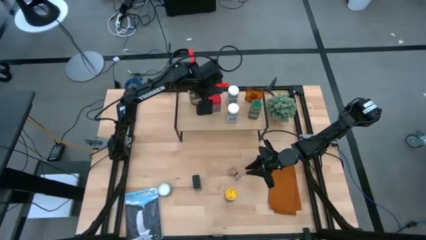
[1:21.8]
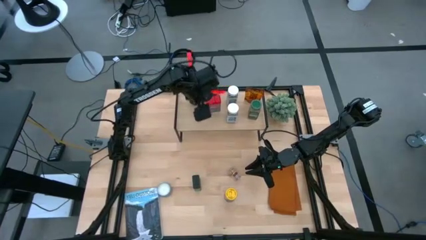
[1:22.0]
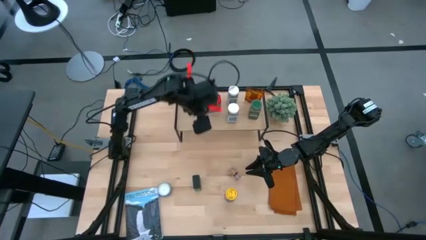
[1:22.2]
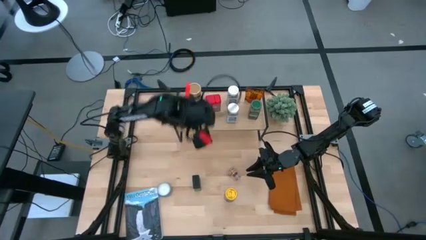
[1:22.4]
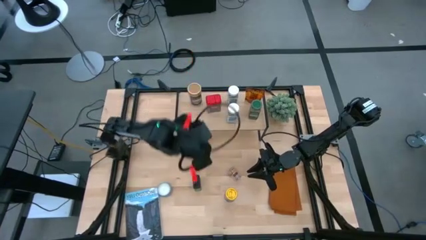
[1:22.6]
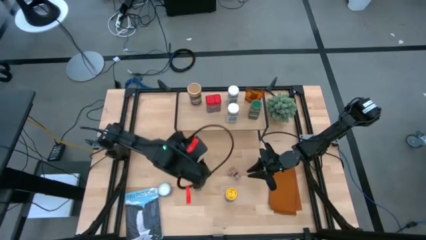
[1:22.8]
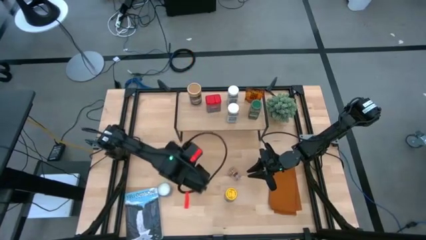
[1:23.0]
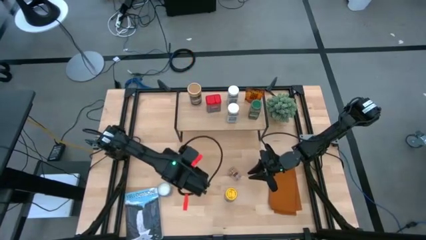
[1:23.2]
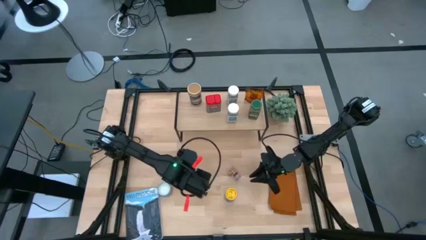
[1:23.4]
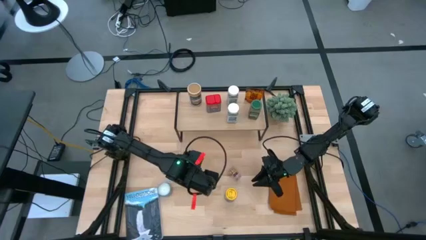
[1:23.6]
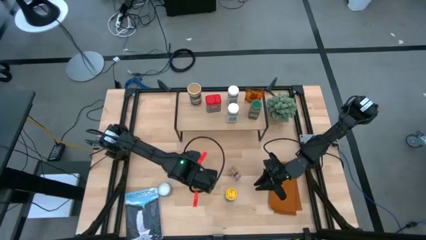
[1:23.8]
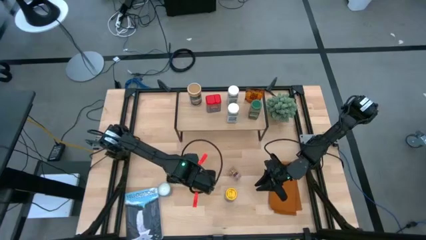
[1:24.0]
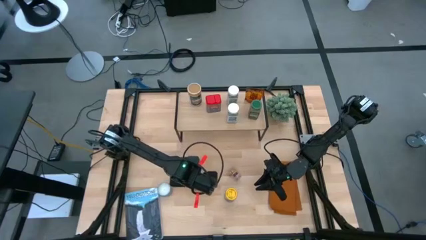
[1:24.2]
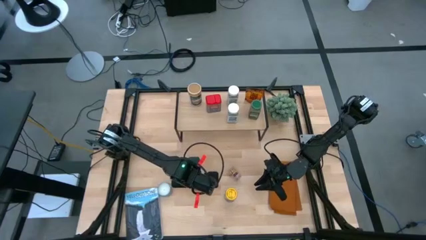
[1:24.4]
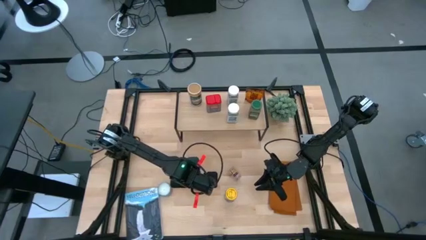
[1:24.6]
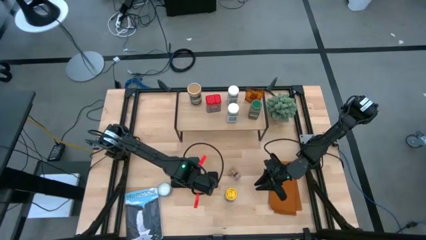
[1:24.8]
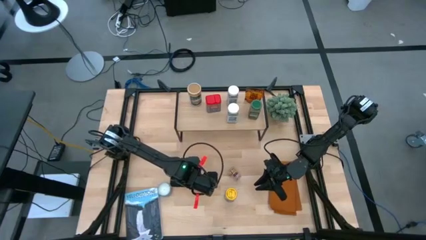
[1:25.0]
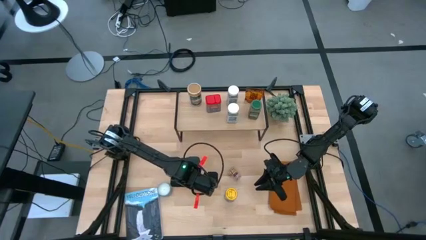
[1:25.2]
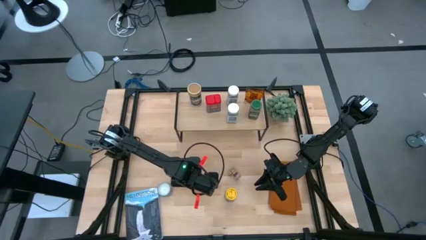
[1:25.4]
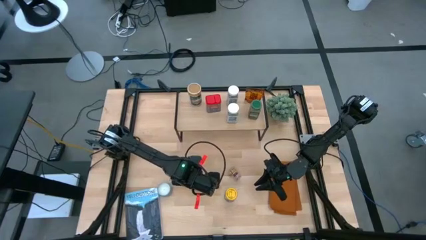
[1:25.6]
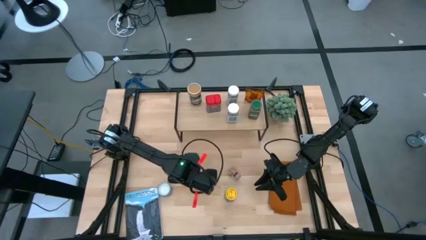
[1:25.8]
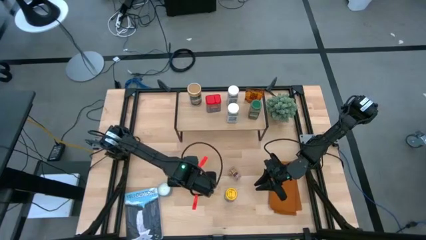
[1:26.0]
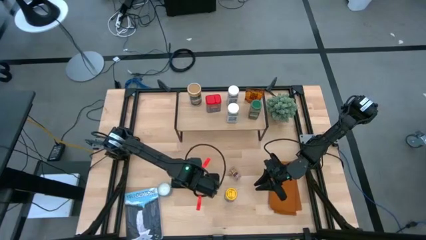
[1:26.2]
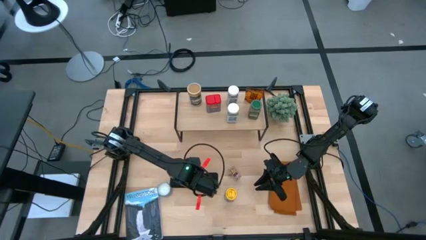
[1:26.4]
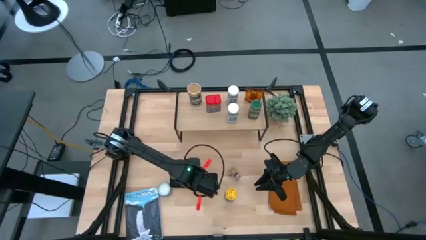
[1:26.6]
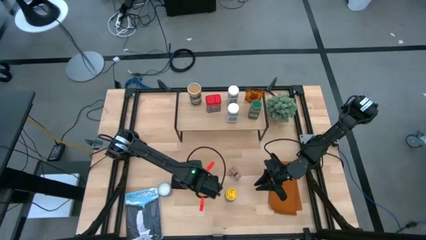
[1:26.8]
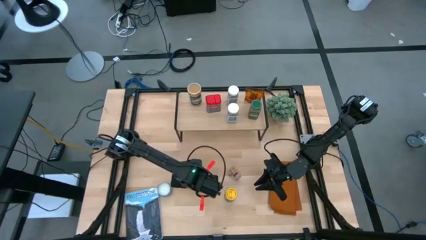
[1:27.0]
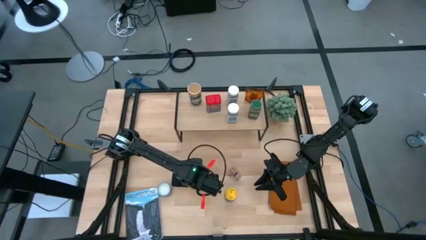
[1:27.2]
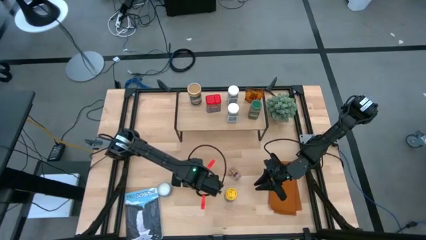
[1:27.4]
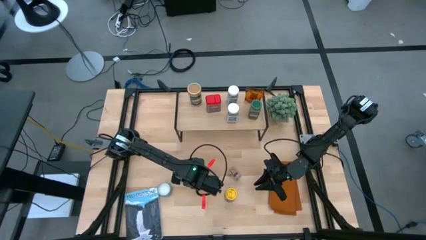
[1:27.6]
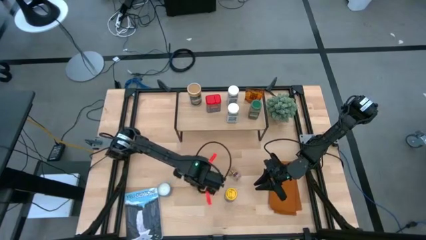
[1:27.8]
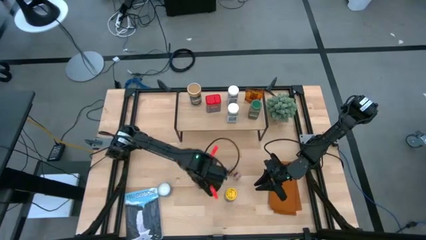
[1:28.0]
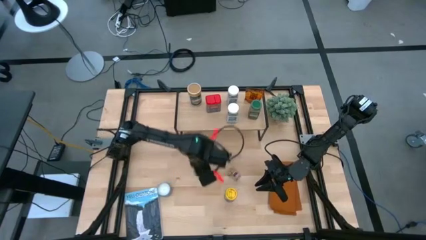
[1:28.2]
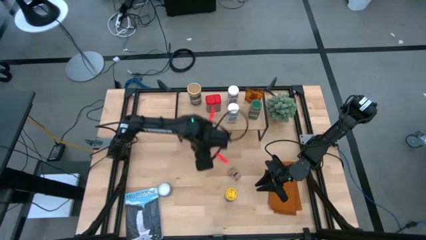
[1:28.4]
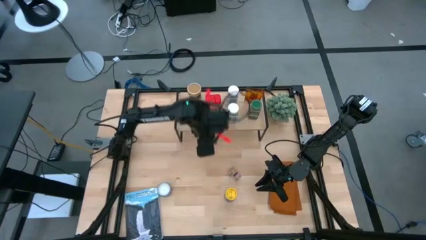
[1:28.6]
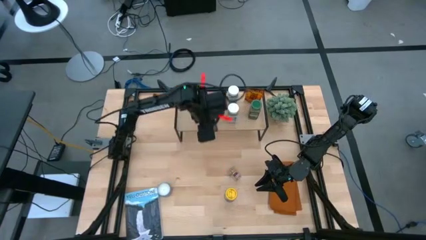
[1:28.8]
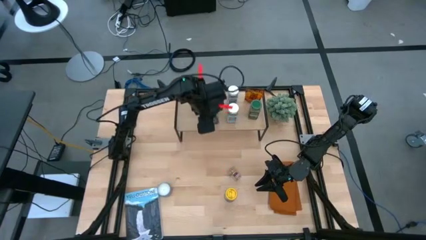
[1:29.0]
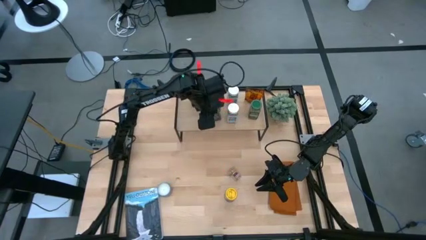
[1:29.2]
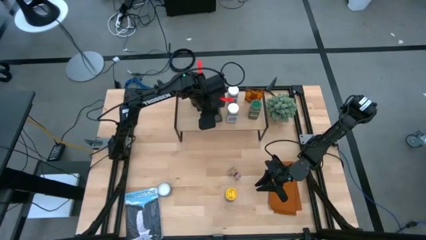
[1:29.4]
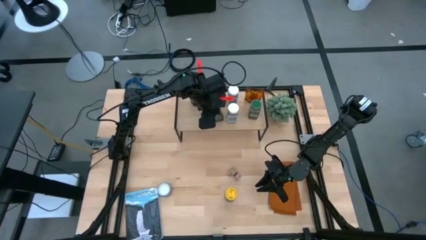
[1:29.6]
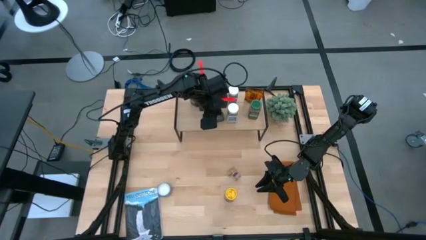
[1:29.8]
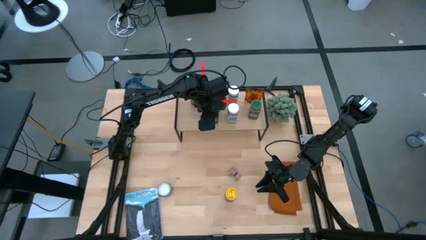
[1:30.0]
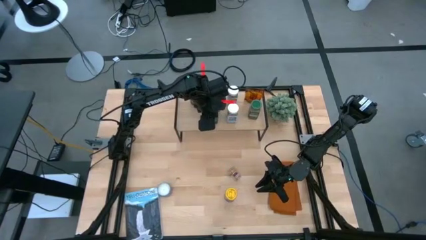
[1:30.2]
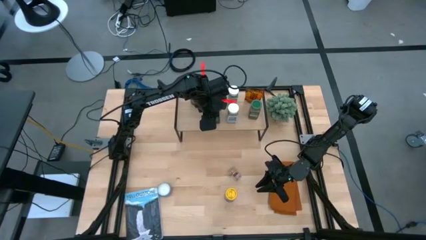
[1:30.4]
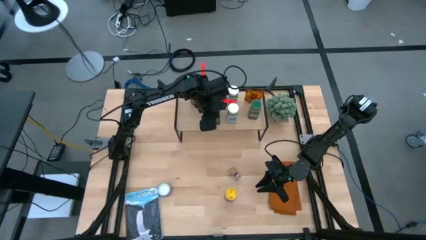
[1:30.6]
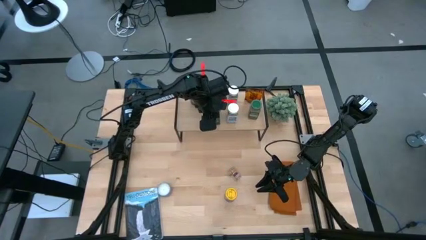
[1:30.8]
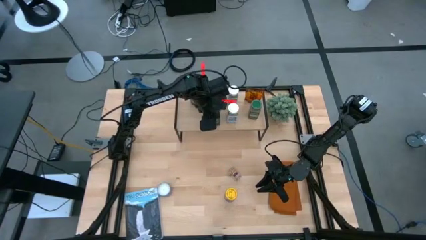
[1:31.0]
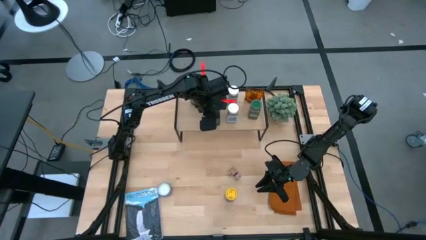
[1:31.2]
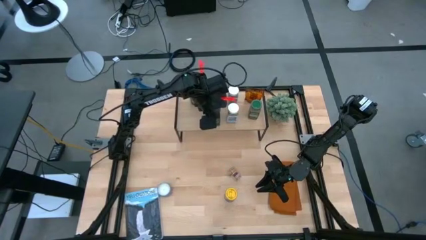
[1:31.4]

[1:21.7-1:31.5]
Task: Shelf spices
Put the black seasoning can on the shelf

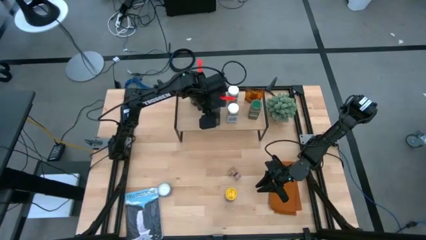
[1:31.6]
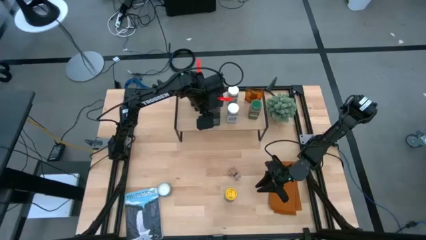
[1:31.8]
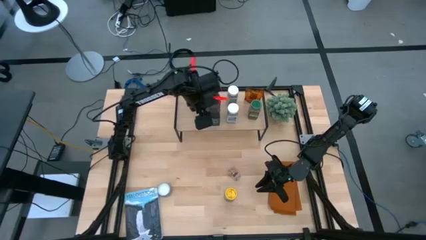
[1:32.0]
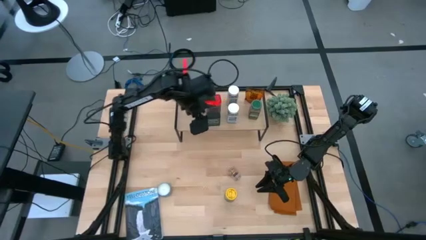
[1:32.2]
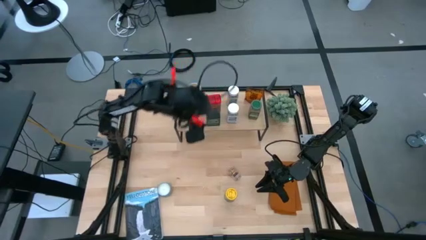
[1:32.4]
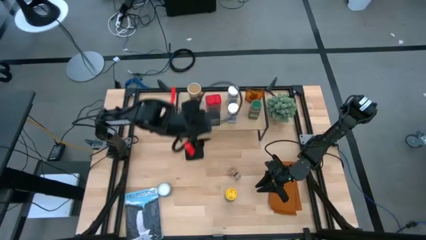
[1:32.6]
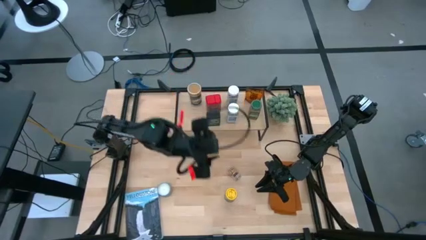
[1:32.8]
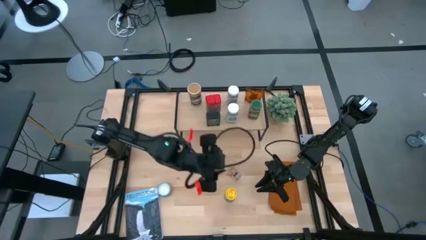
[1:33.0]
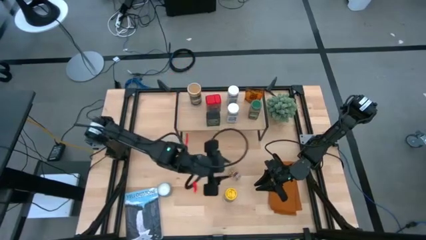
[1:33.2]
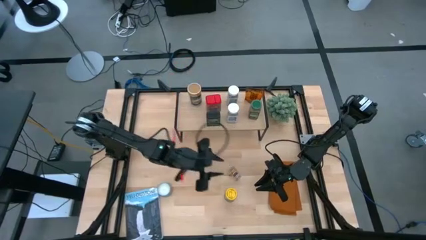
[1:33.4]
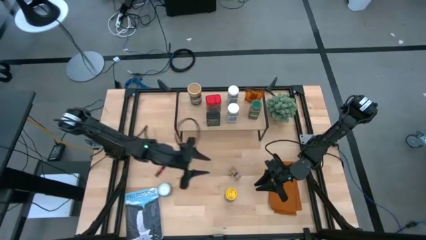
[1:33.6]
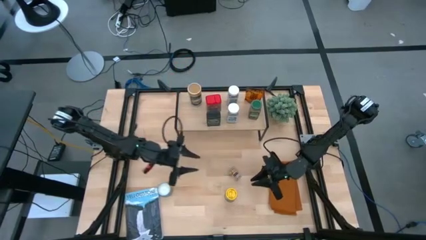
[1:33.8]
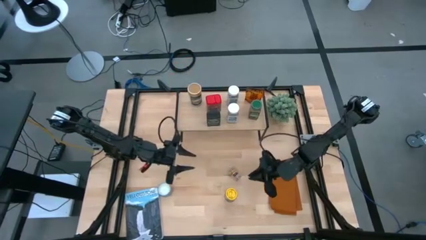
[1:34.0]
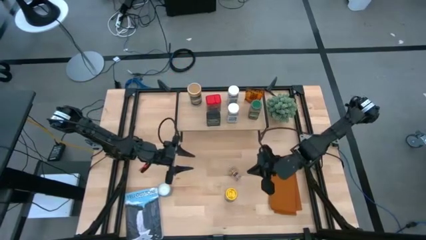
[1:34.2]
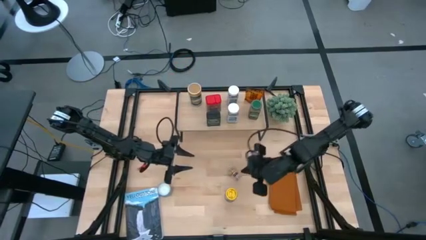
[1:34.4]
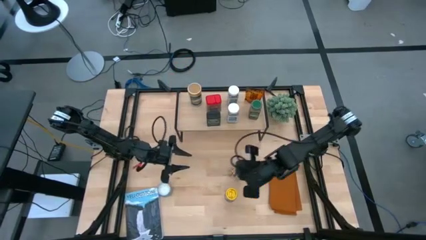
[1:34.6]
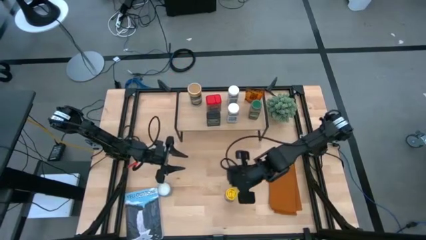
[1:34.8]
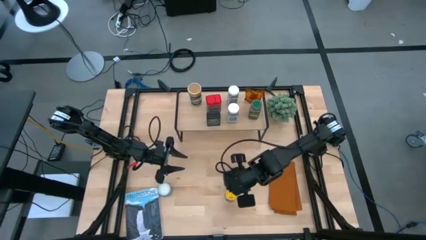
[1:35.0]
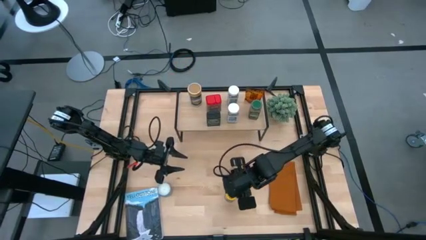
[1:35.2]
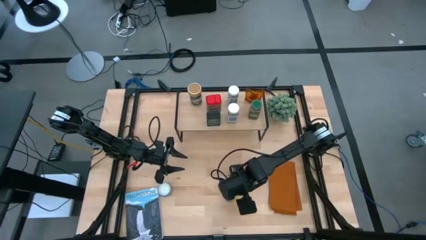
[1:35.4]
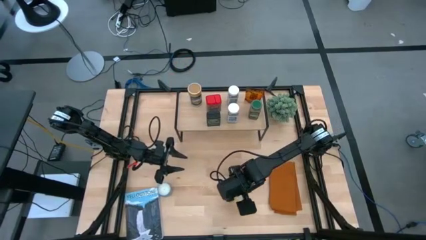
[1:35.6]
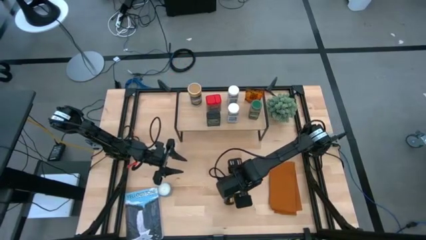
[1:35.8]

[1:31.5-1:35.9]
Put the yellow seasoning bottle on the shelf

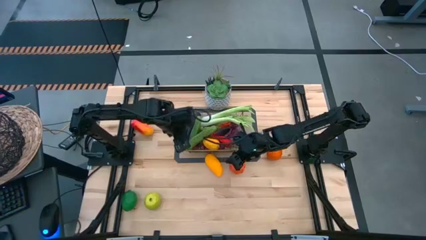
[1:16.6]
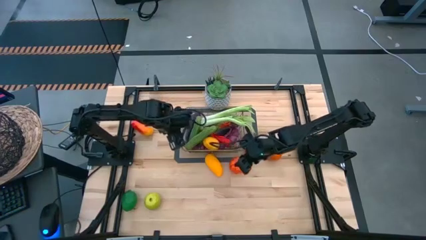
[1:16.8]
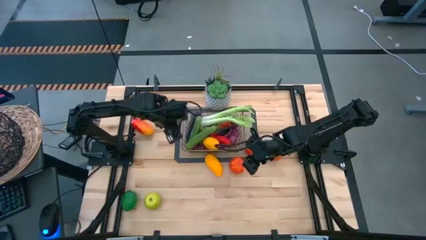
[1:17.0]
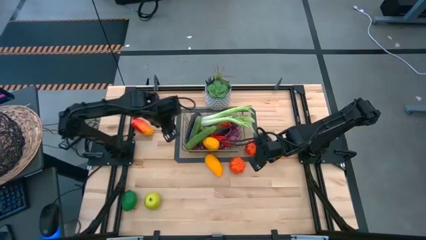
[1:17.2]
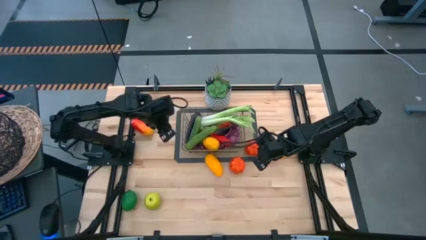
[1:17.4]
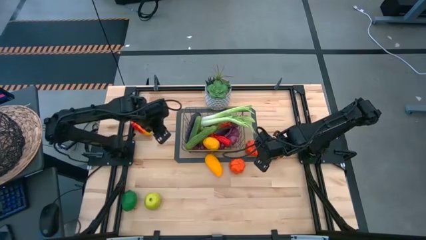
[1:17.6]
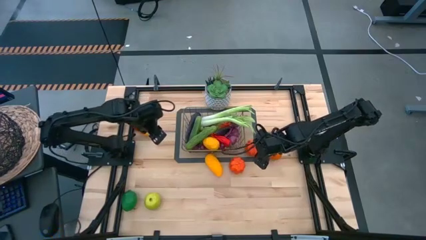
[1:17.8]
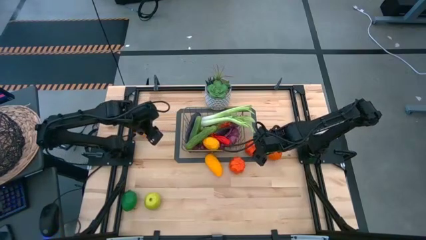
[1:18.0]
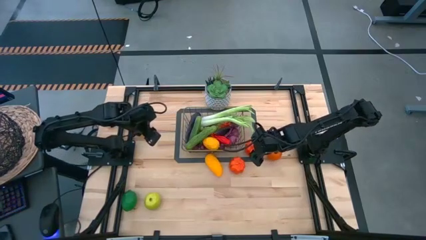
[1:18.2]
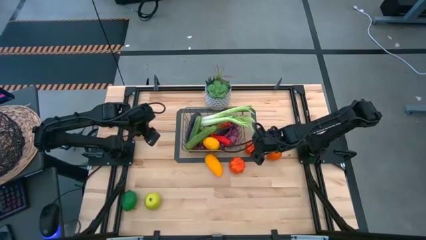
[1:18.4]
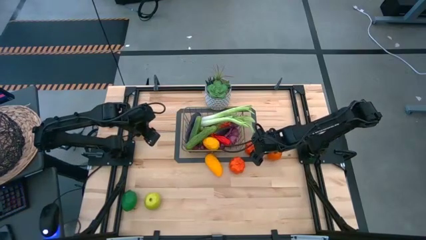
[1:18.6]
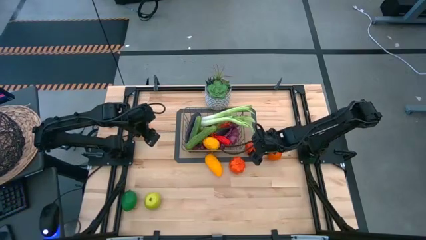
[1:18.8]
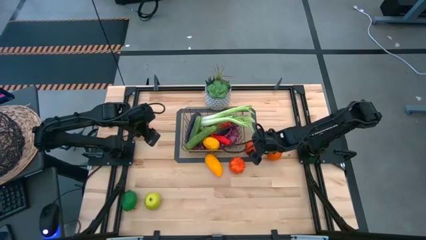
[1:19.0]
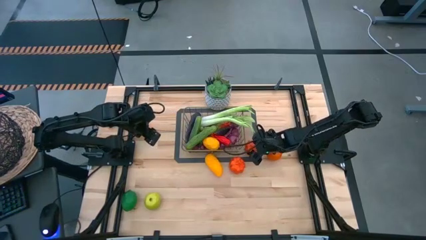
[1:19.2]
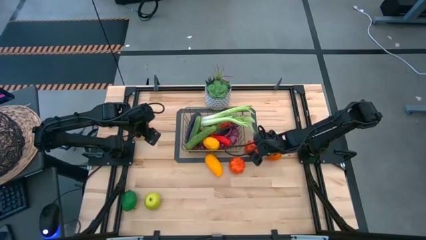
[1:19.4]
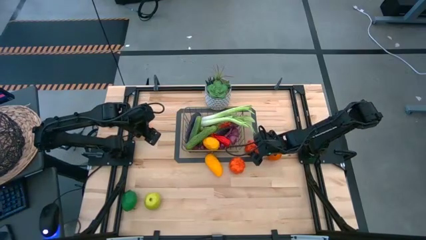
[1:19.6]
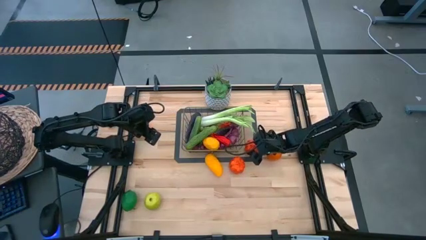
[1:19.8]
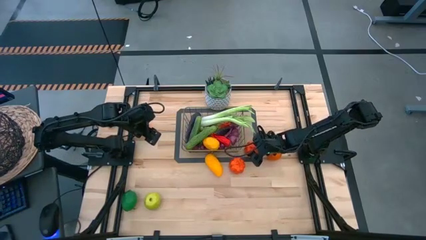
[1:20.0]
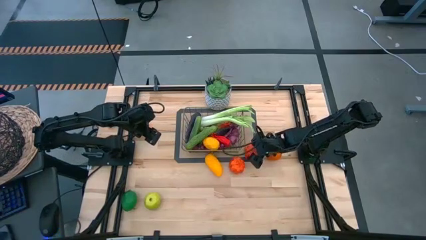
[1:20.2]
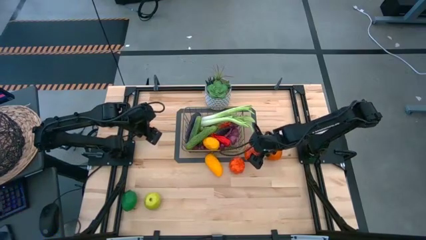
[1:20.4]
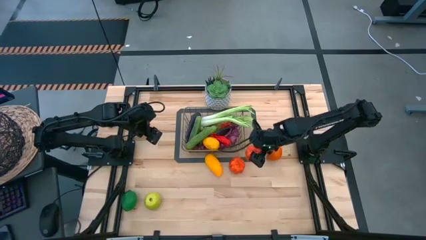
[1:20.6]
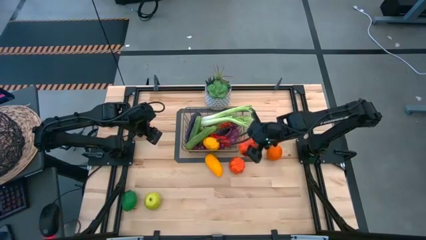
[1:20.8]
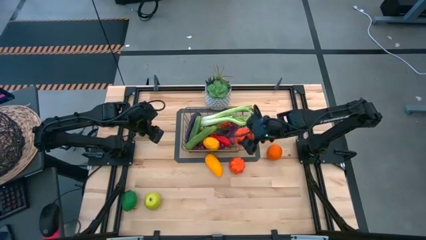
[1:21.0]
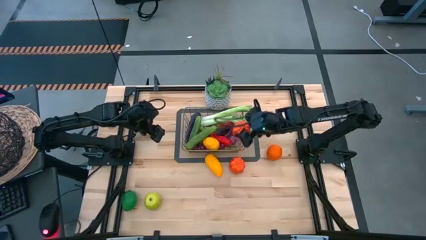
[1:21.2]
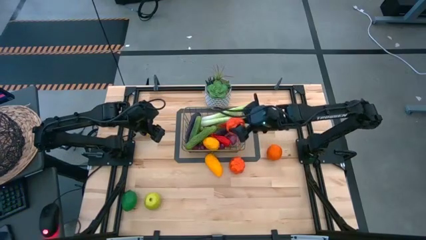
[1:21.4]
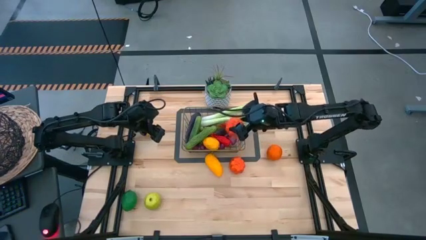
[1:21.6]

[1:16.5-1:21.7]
Task: Build produce basket
Put the top pumpkin into the wire basket
